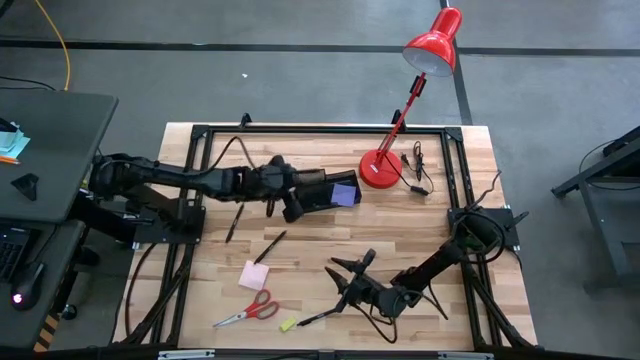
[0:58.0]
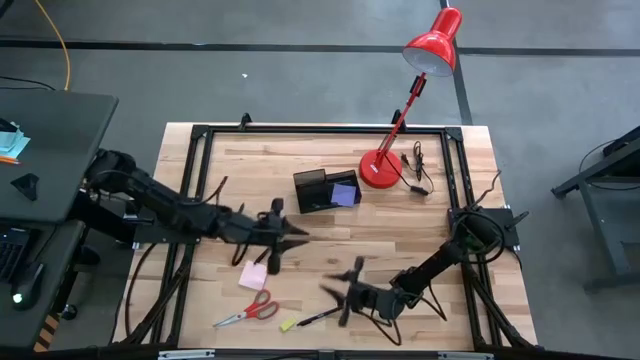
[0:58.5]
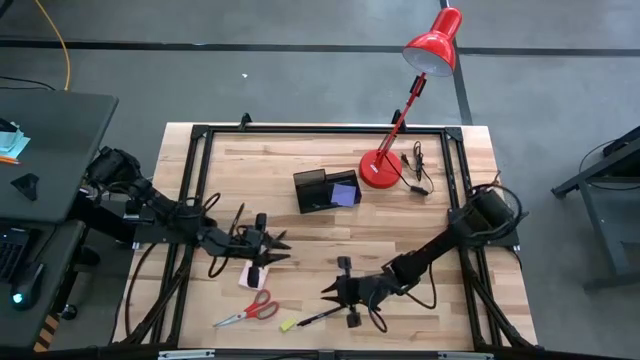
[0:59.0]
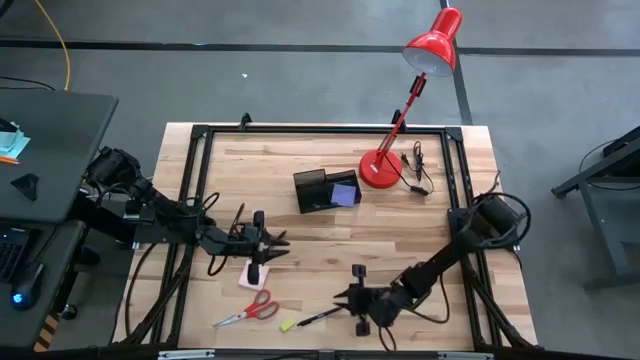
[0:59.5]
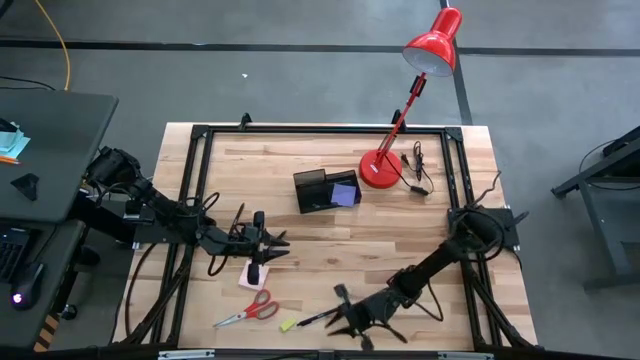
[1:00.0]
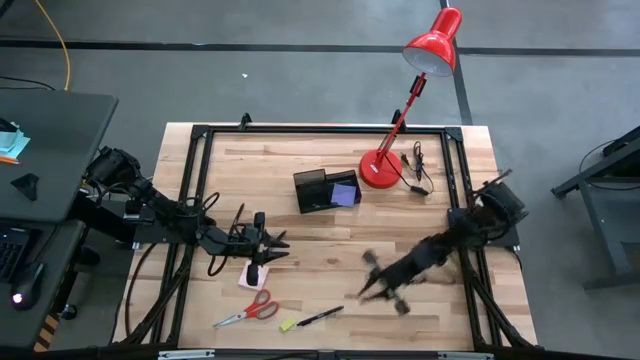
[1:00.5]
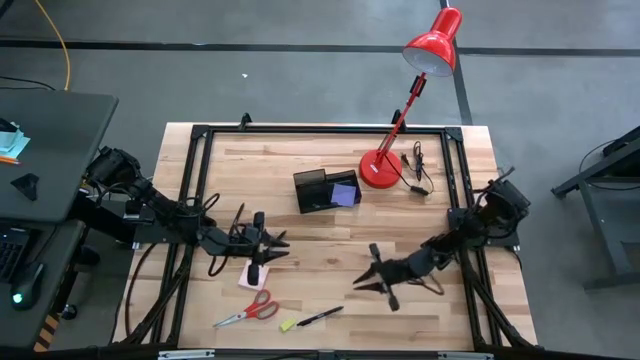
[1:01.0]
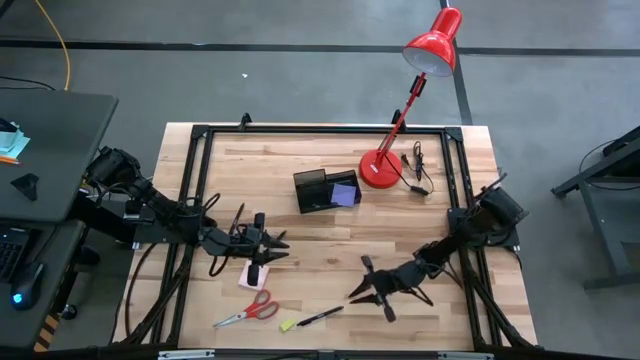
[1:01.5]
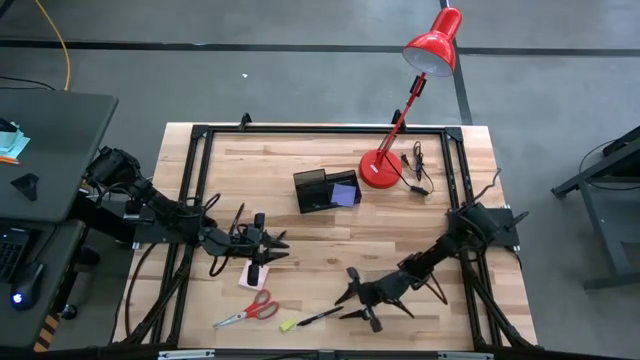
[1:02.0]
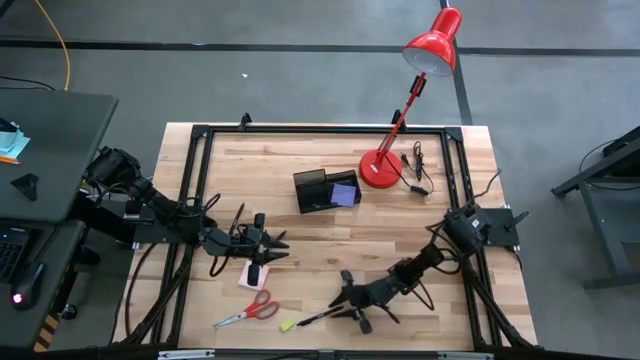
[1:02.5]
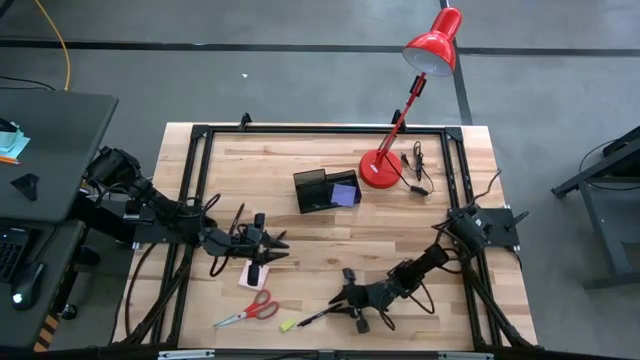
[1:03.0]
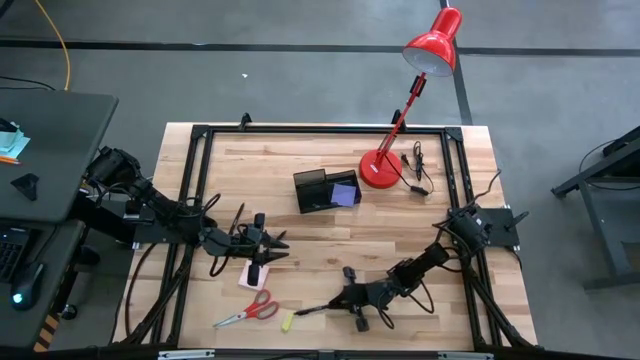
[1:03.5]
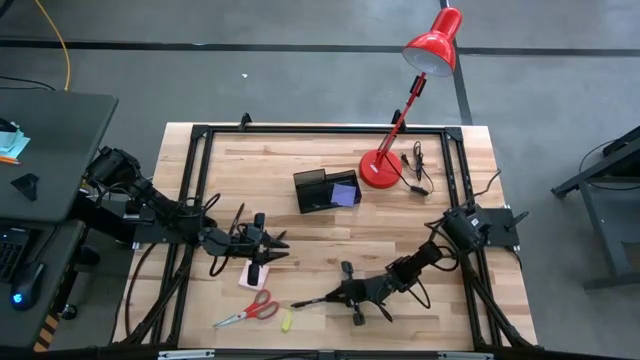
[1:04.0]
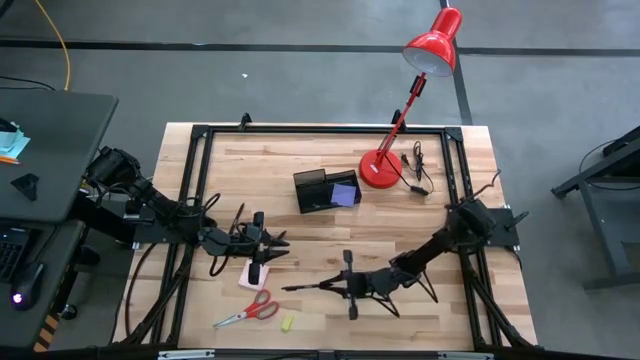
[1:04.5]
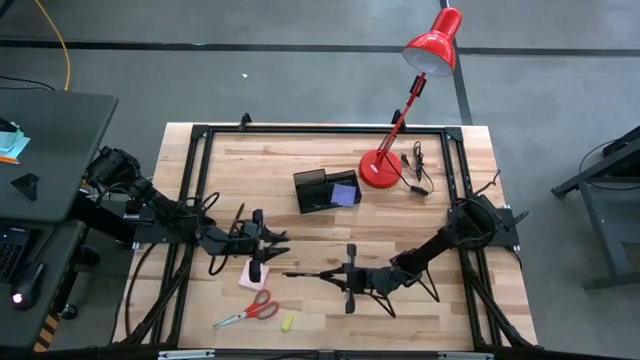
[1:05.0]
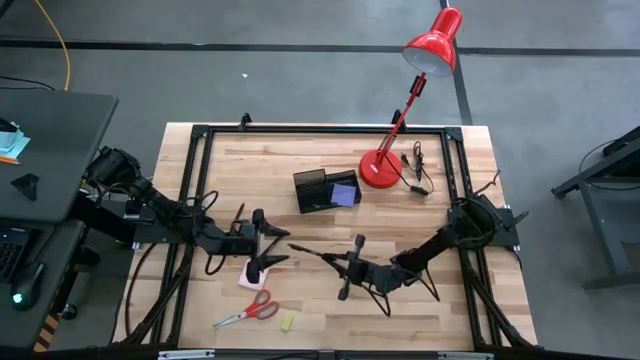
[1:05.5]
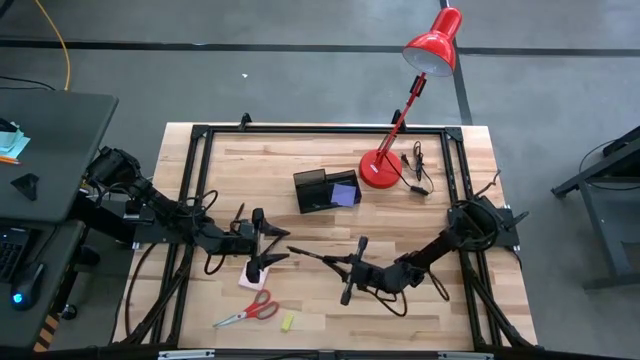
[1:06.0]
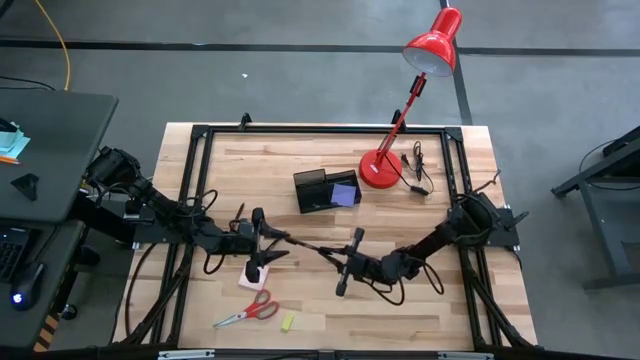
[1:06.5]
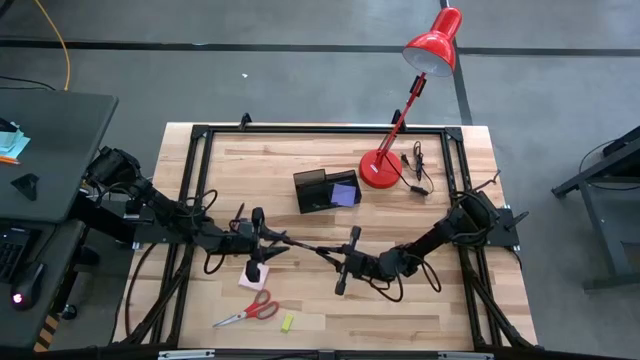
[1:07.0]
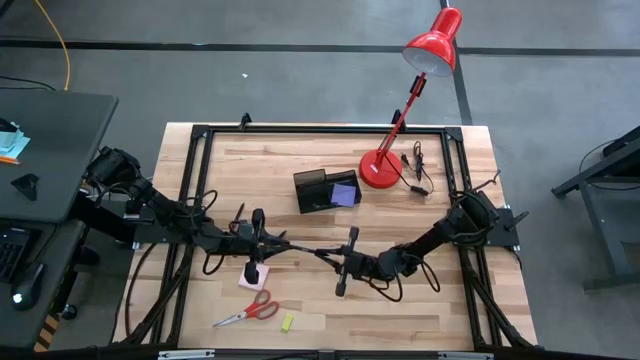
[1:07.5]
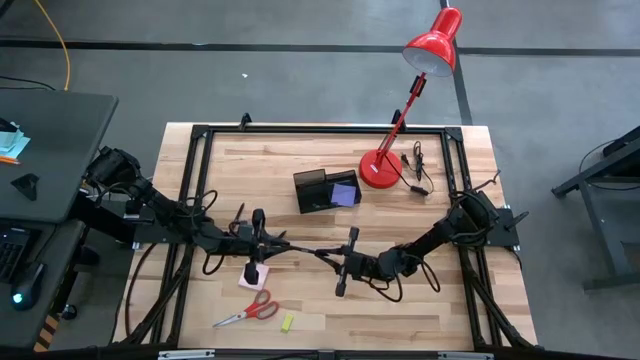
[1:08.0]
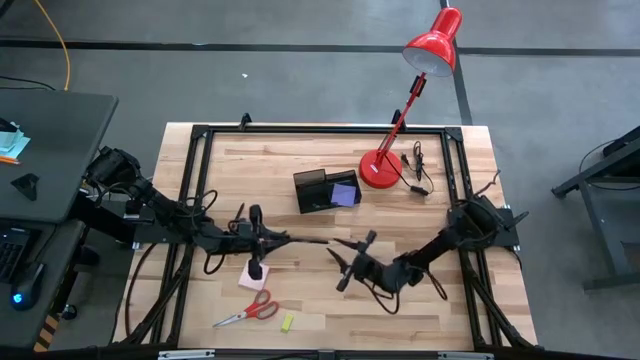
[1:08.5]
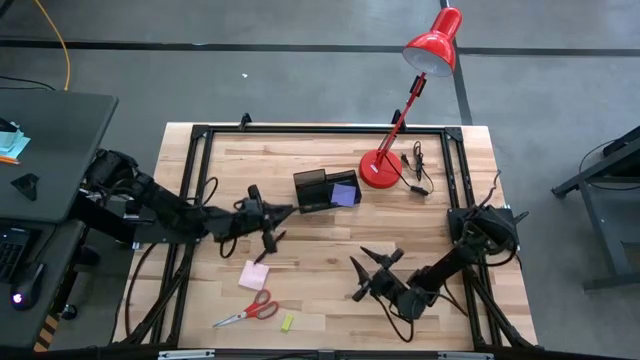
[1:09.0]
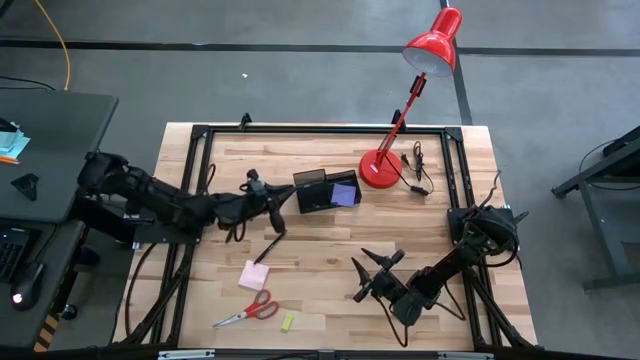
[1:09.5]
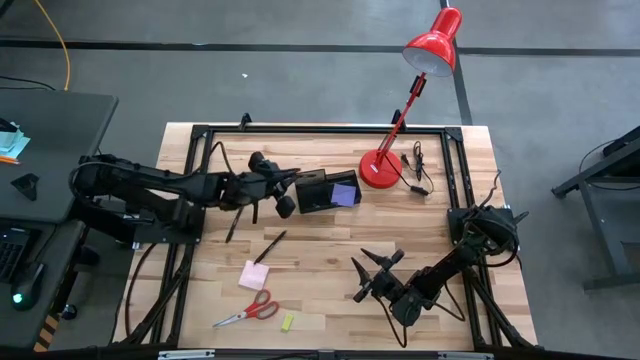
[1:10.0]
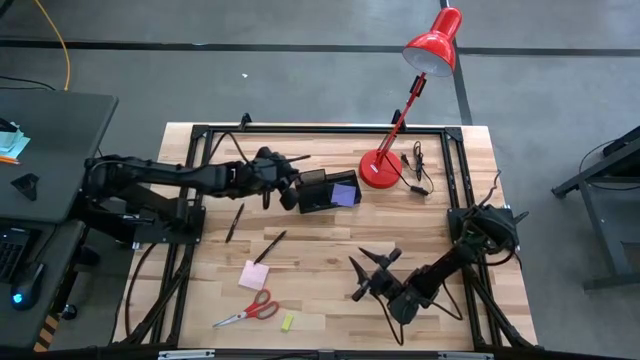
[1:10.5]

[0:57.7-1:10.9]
Task: Pick and place office supplies into organizer
Put the black pen into the black desk organizer

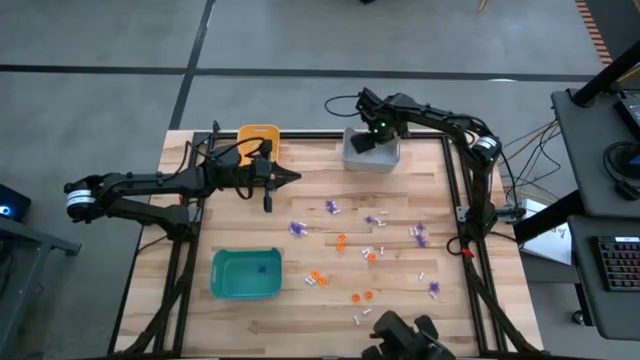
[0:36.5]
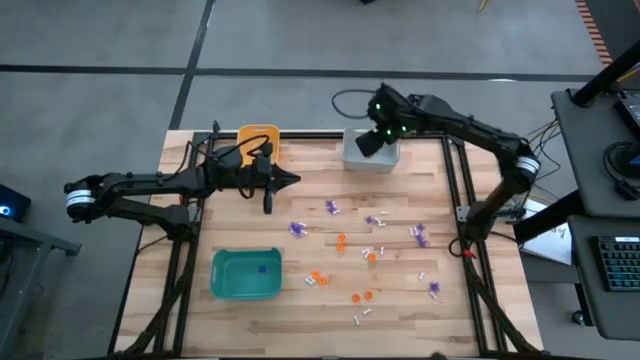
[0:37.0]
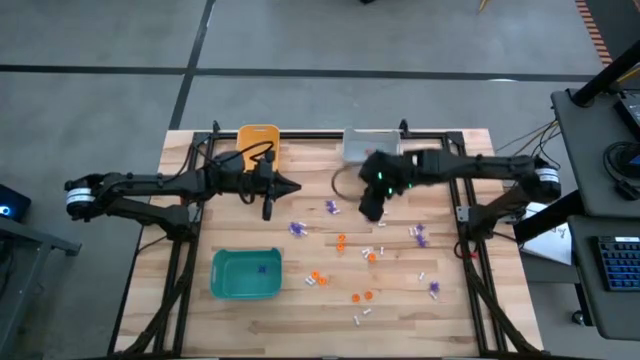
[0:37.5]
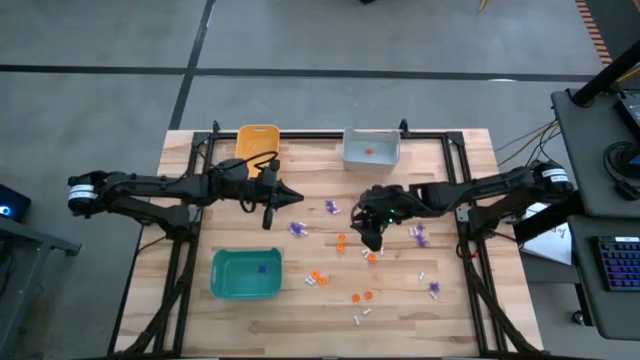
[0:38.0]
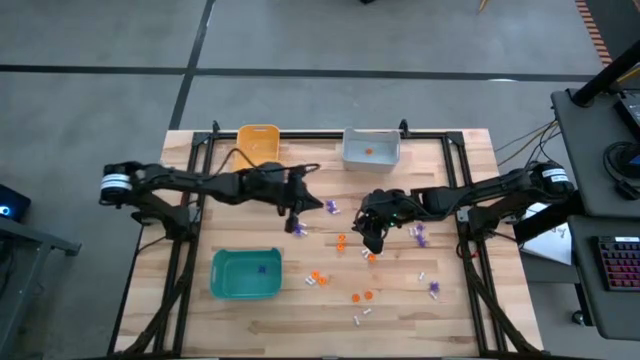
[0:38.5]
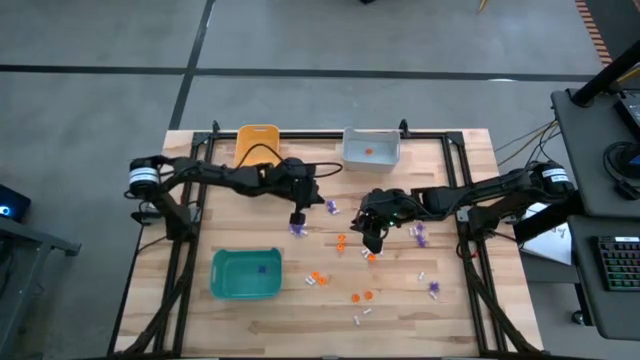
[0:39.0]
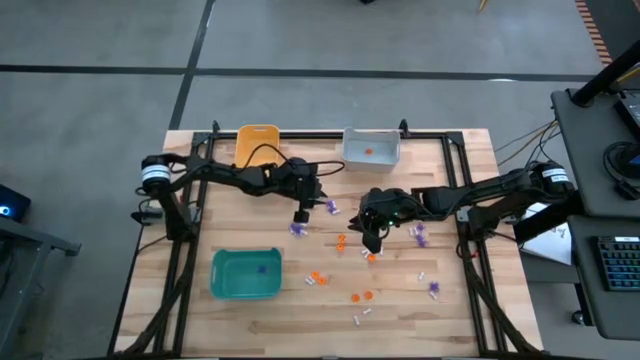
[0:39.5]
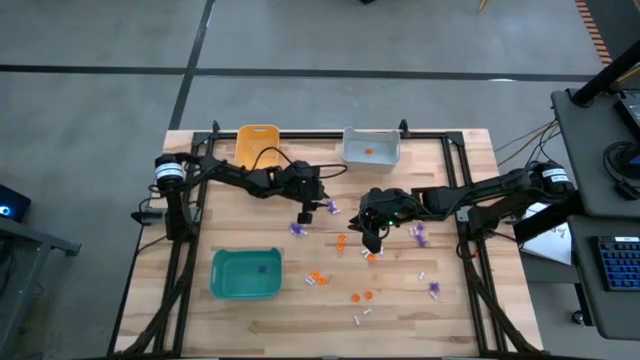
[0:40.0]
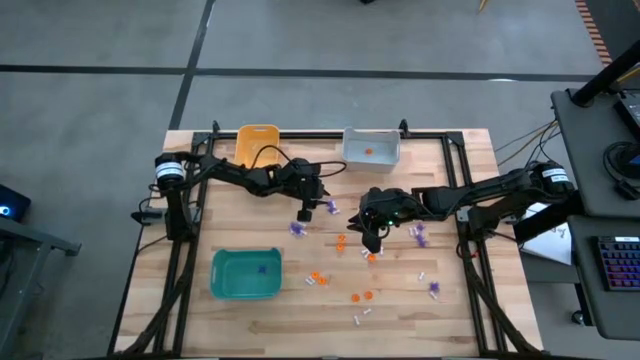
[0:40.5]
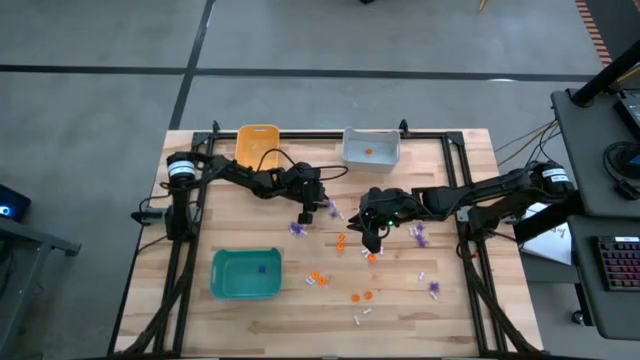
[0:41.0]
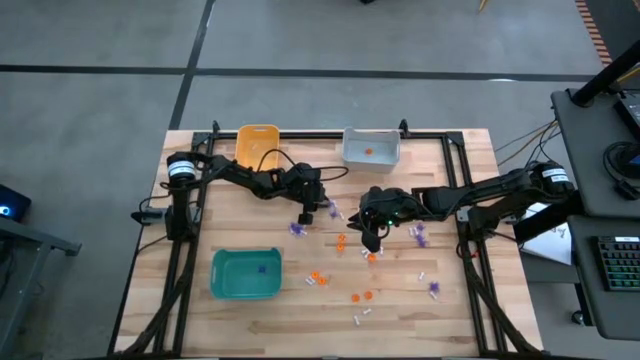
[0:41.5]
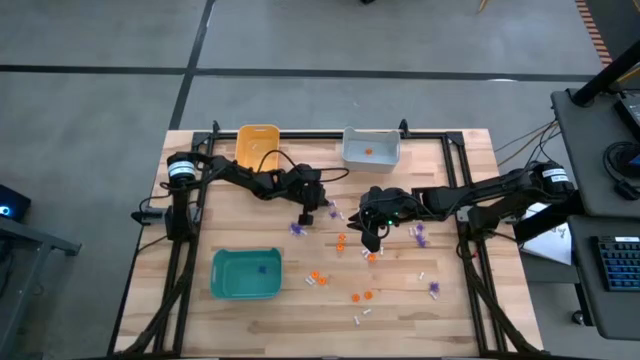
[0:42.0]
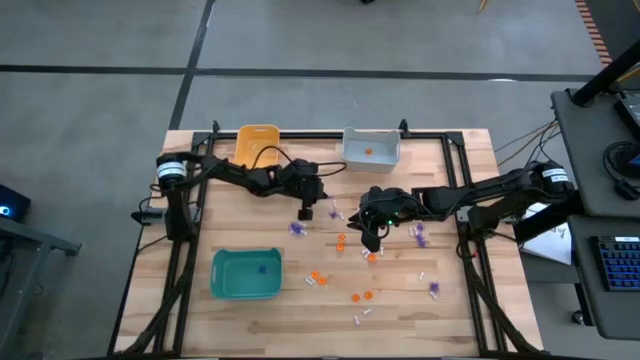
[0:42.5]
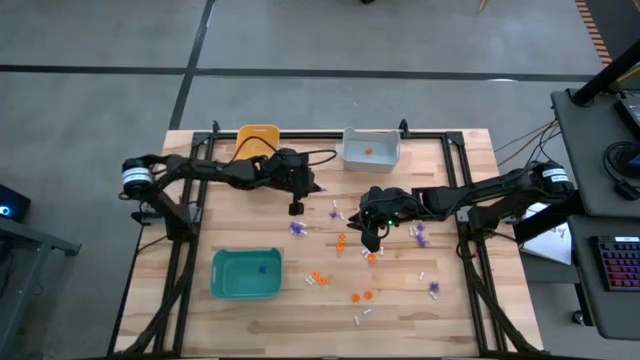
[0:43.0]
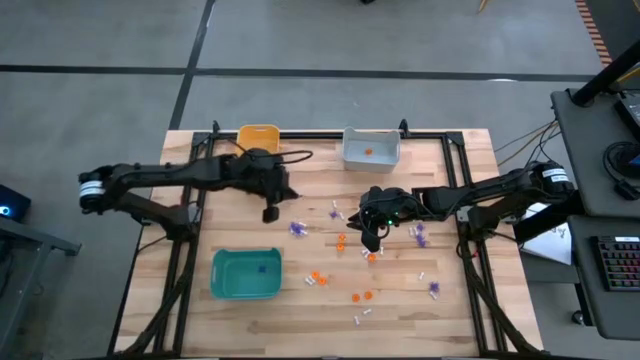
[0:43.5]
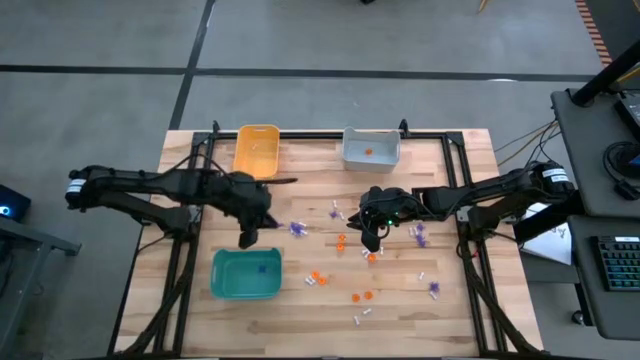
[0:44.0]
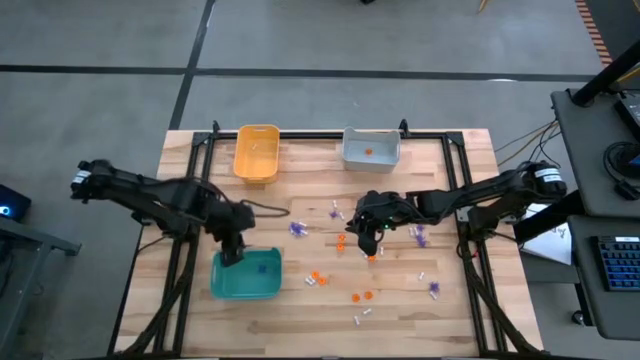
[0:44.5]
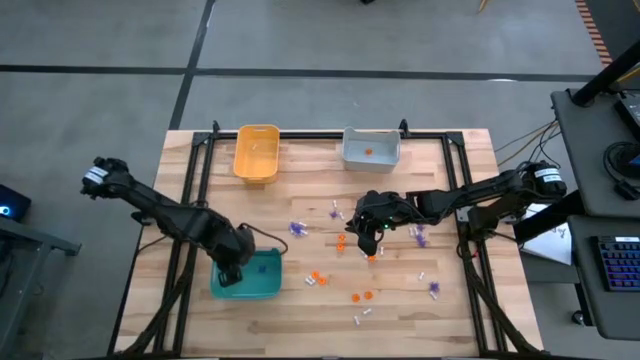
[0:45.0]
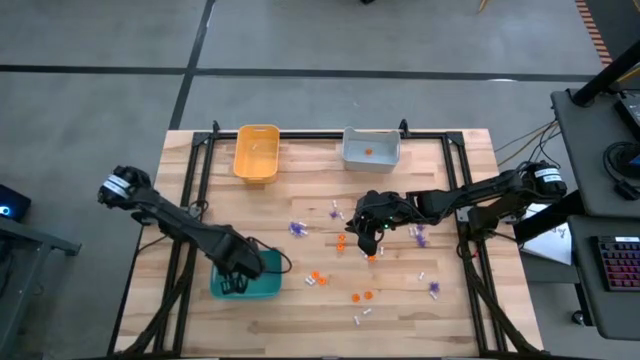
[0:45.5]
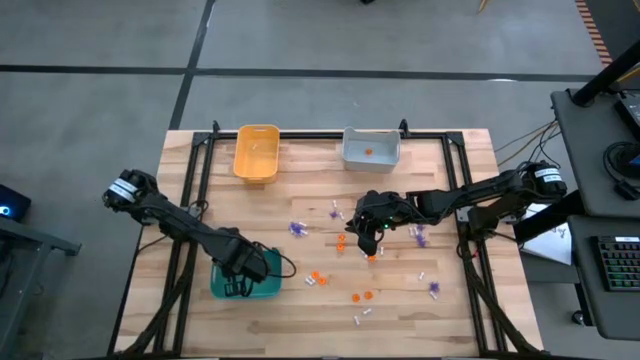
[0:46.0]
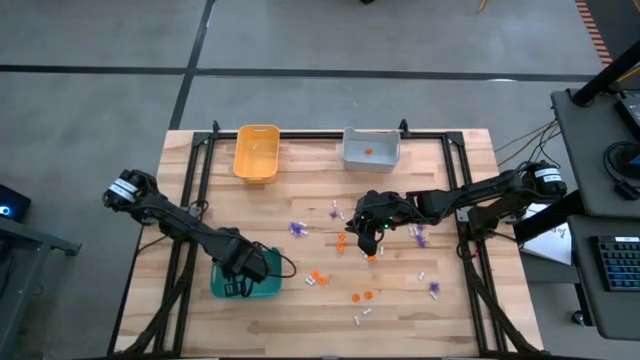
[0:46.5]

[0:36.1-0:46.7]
Task: Sort Halloween decoration
Put the blue spider toy into the green bin
